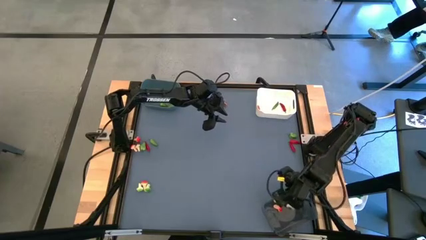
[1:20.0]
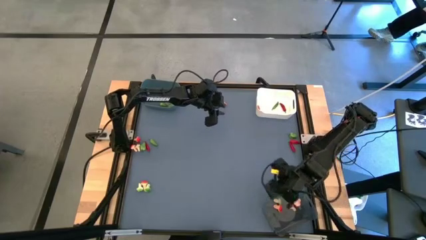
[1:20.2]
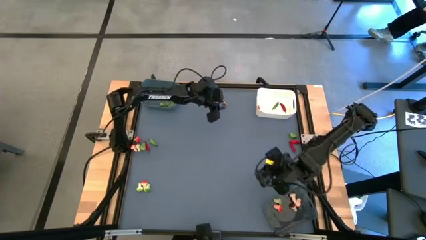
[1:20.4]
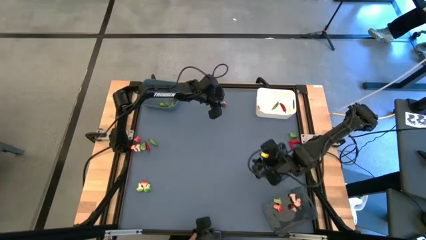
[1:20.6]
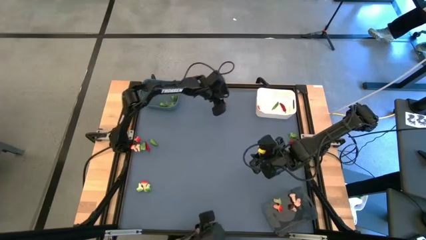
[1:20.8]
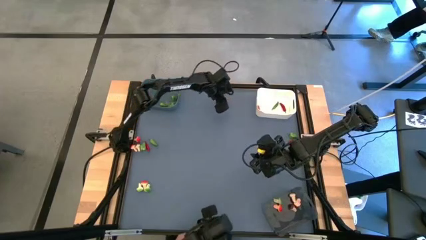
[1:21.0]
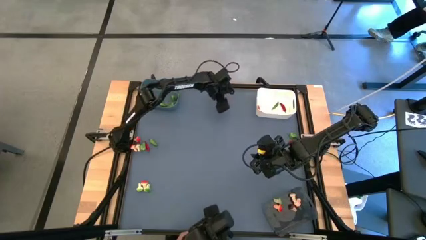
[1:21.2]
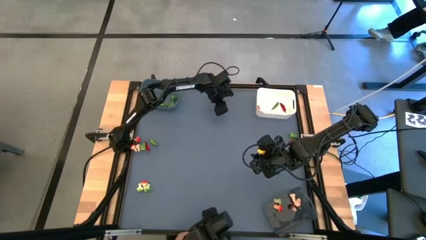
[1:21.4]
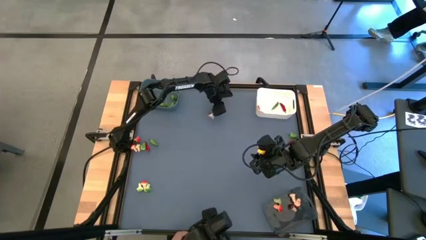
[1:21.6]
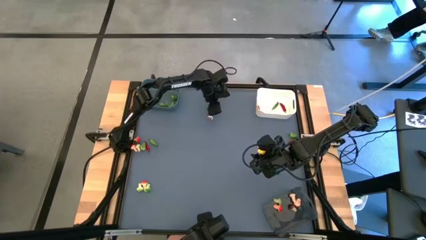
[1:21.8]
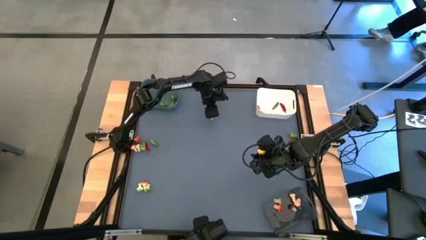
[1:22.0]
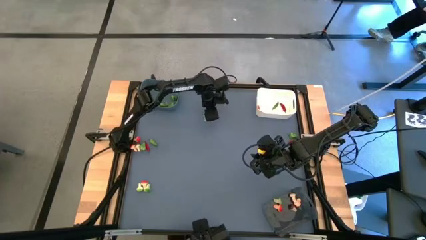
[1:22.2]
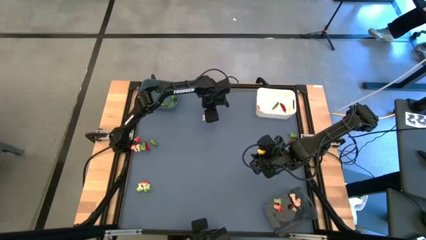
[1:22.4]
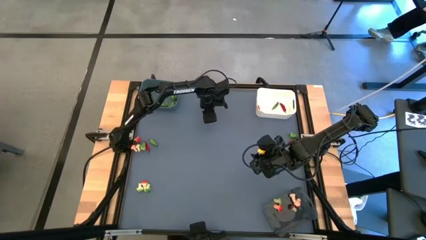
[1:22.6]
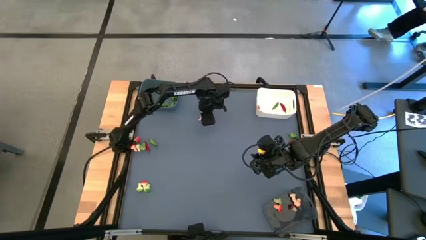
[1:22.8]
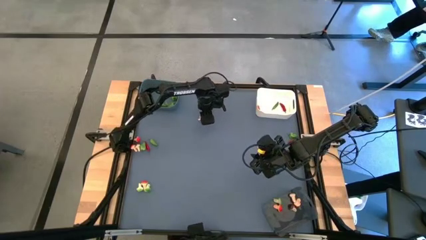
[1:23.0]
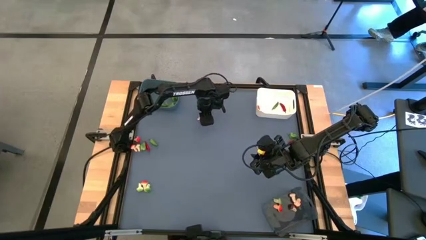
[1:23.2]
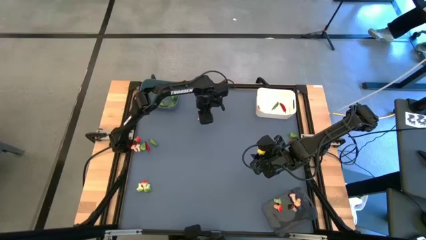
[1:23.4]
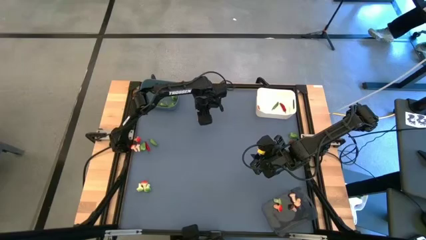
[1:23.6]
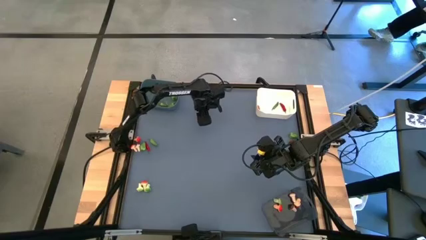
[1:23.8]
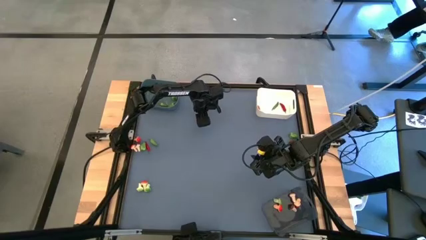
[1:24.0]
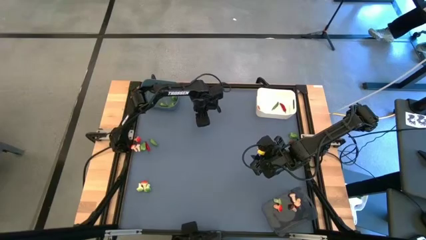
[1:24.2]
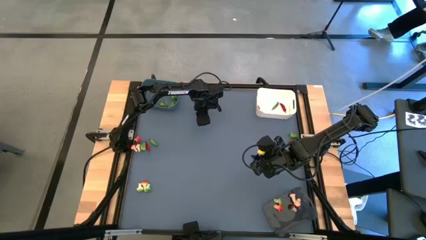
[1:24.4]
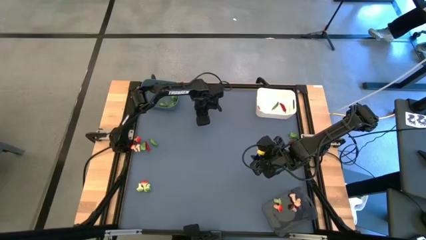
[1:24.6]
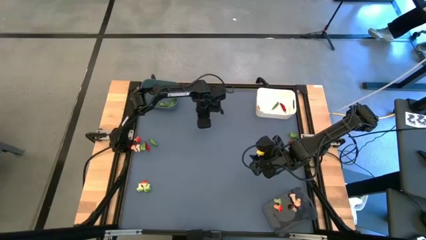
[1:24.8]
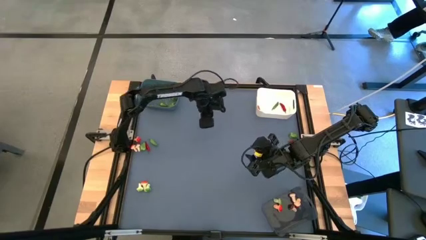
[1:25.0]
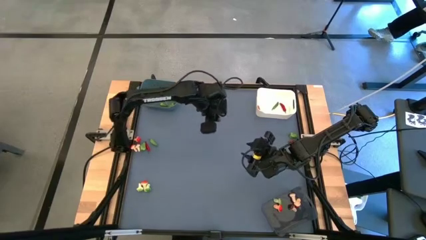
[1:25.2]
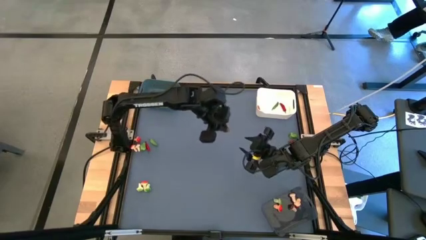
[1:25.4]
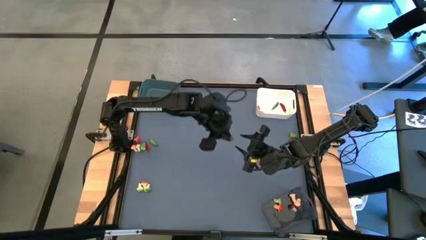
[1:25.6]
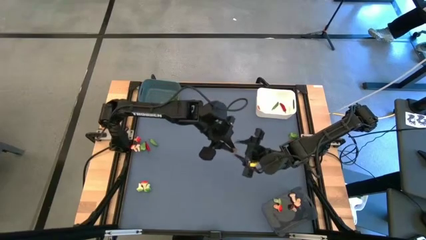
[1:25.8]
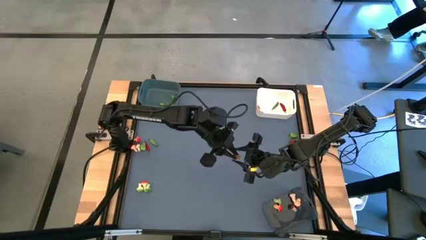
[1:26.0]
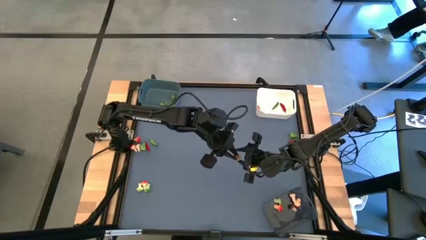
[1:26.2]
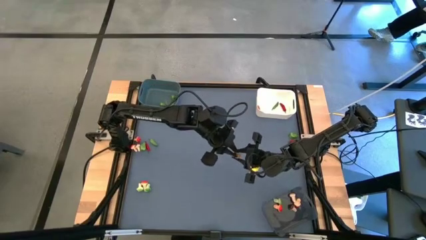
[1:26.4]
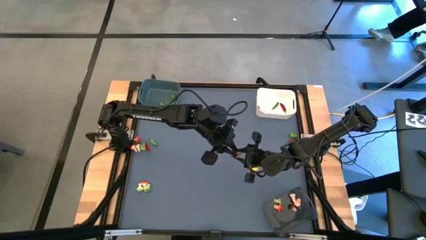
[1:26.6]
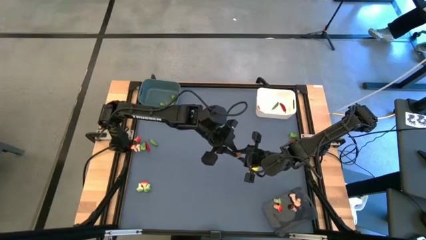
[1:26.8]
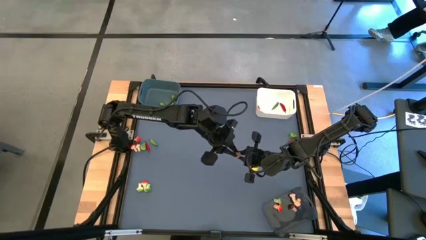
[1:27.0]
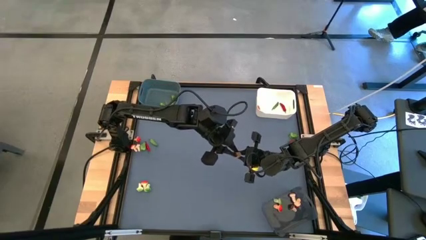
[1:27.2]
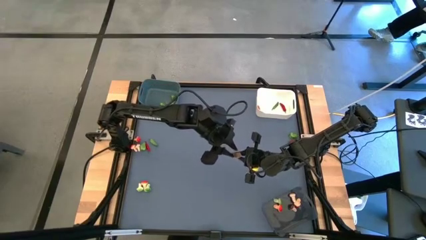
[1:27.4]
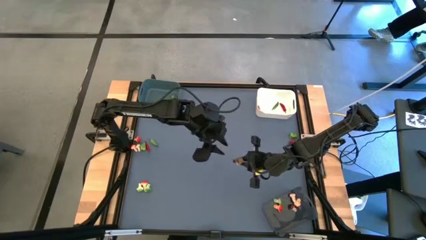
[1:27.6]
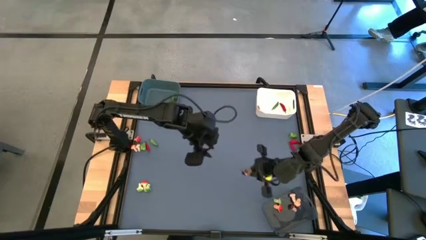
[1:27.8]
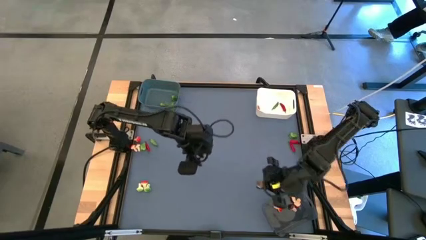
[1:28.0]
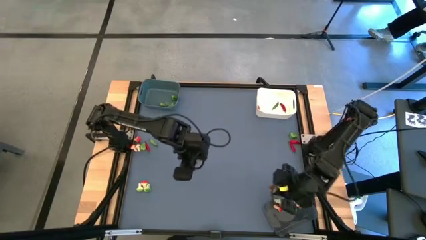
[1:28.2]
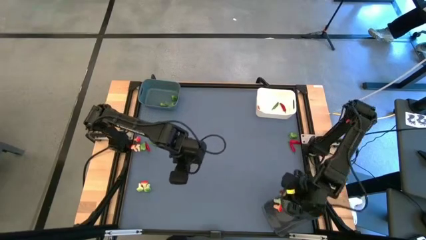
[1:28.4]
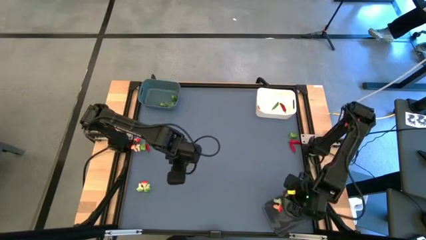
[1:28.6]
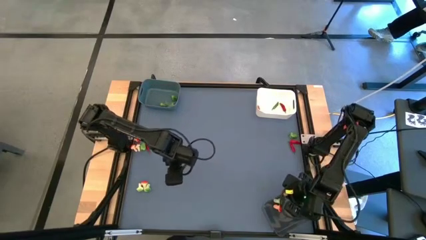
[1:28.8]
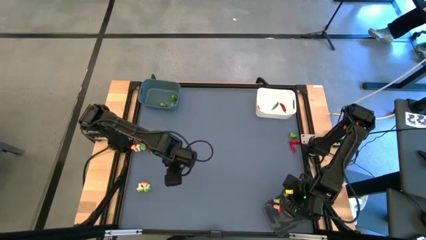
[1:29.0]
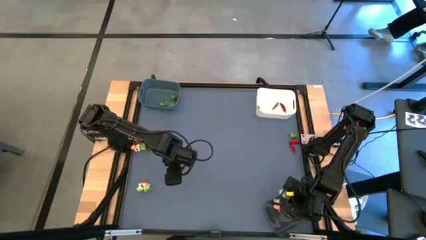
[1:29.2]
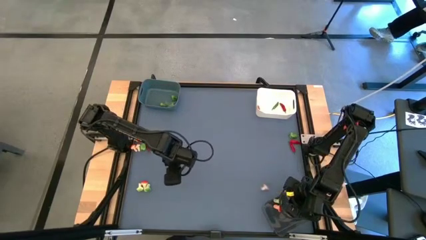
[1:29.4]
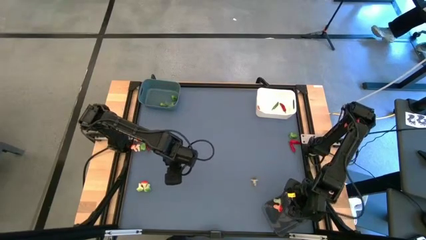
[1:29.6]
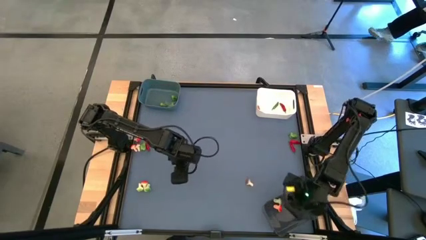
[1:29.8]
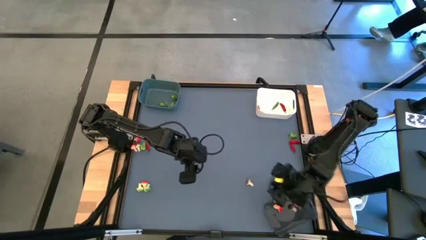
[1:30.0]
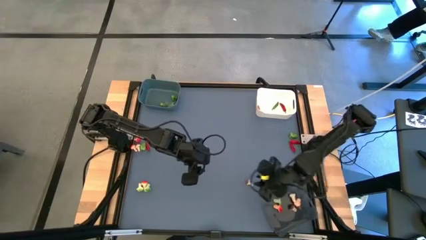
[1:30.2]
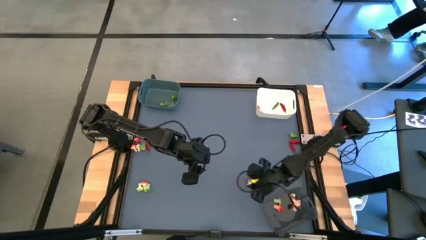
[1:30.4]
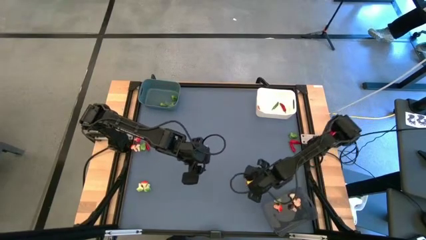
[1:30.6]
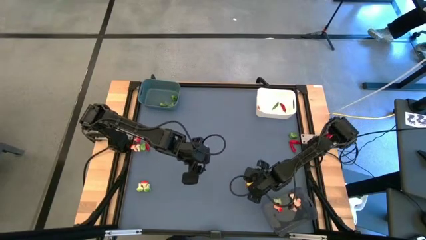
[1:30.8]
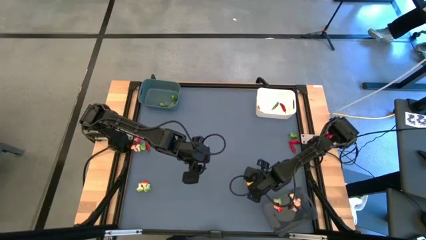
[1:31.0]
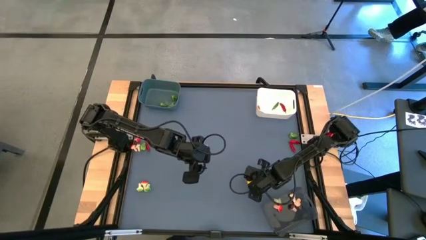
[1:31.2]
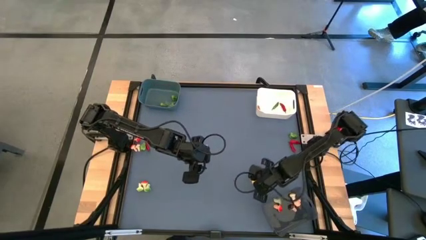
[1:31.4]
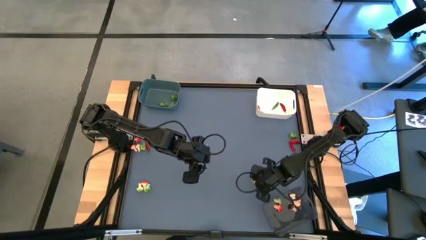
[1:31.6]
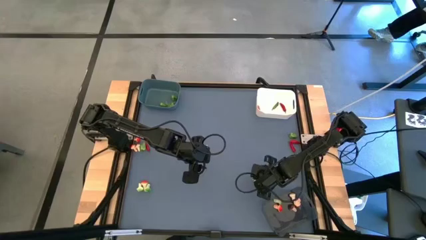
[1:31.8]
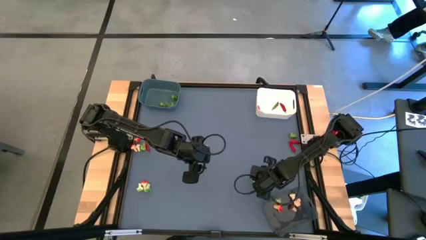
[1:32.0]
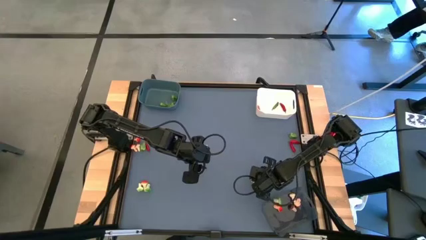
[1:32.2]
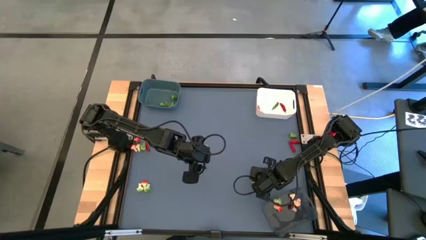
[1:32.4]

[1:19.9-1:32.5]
Task: Sort produce into baskets
Put the brown mushroom into the black bin

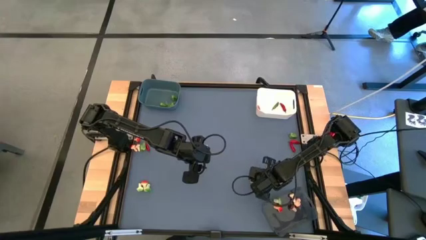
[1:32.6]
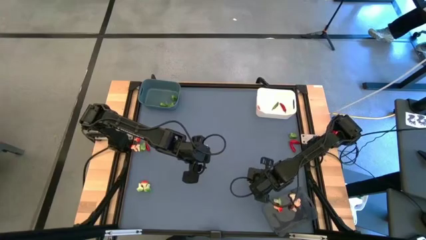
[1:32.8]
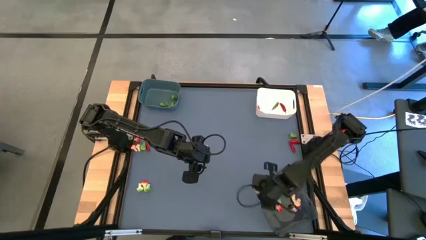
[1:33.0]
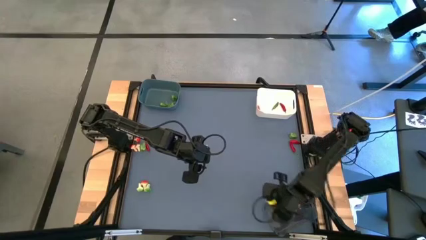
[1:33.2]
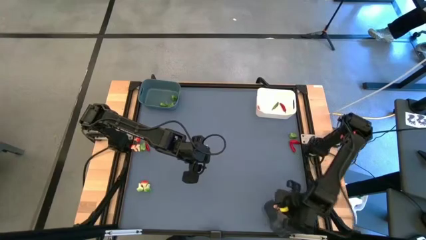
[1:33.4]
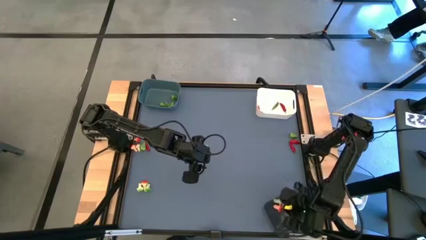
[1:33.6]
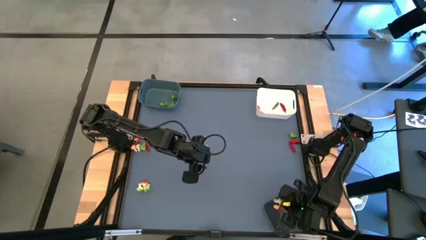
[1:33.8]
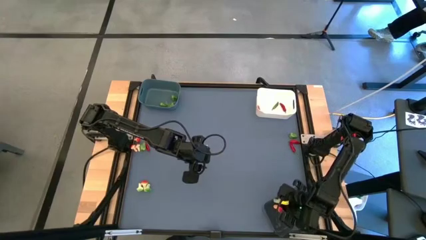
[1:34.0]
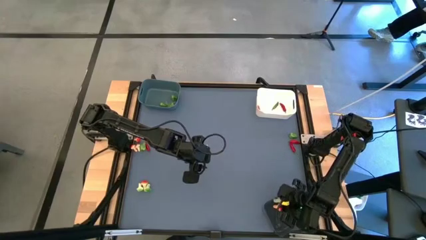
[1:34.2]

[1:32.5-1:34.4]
Put the brown mushroom into the black bin

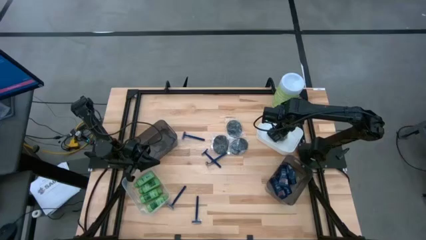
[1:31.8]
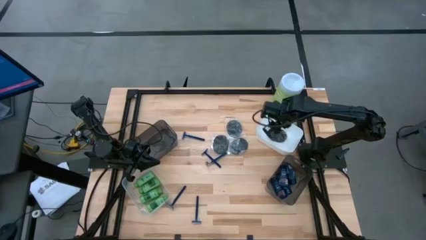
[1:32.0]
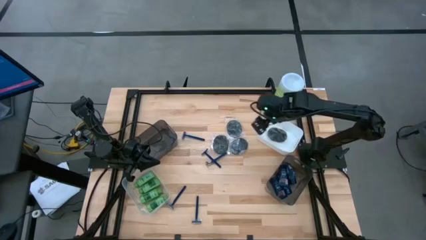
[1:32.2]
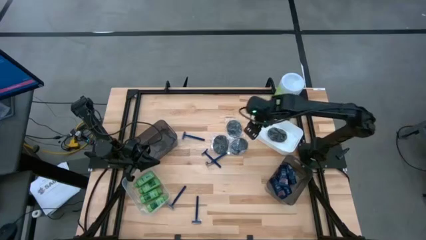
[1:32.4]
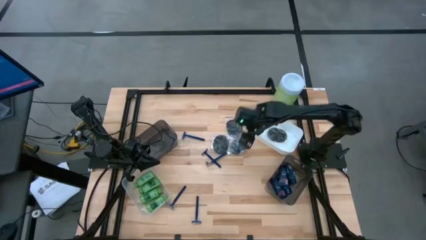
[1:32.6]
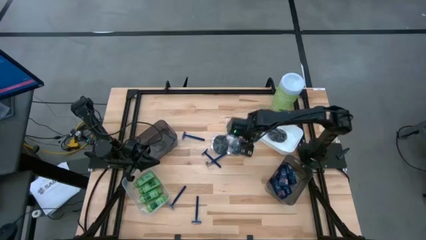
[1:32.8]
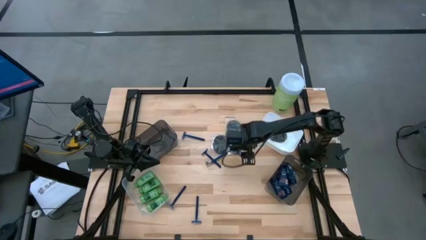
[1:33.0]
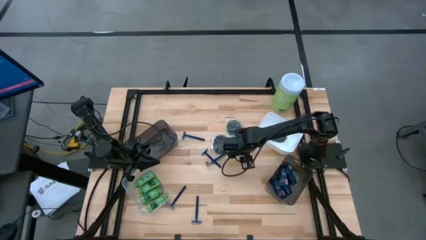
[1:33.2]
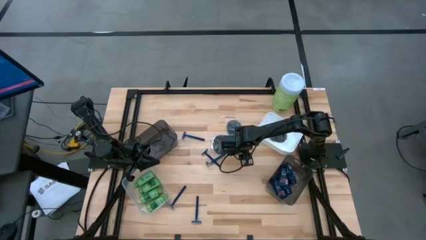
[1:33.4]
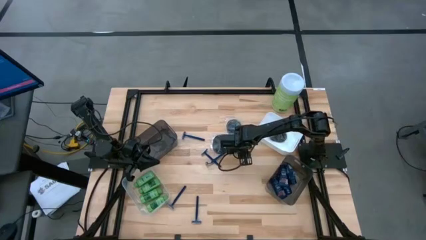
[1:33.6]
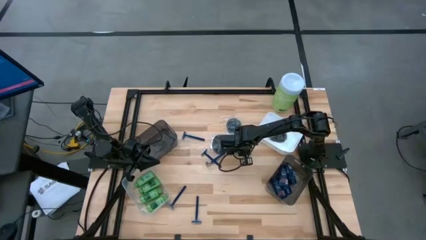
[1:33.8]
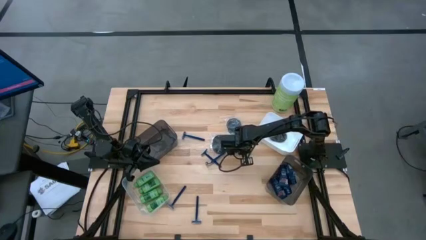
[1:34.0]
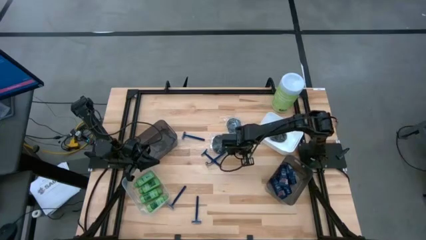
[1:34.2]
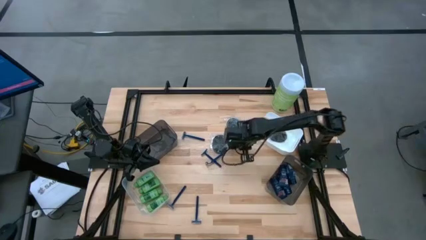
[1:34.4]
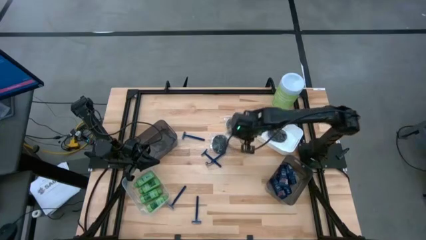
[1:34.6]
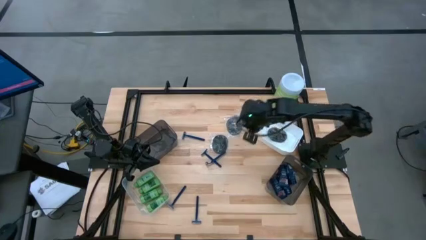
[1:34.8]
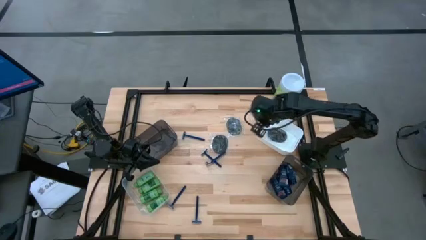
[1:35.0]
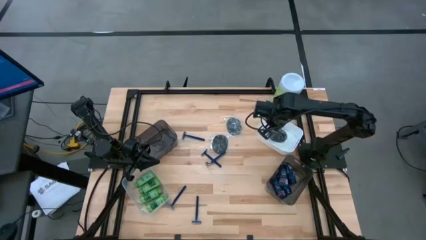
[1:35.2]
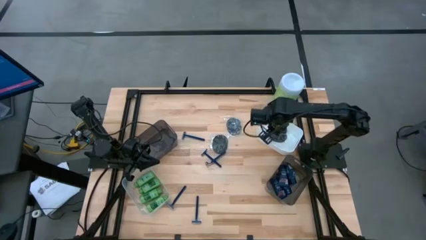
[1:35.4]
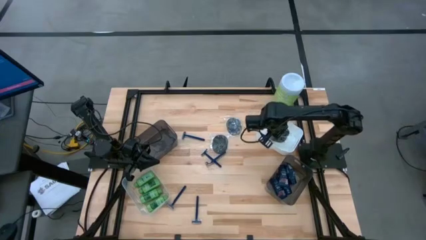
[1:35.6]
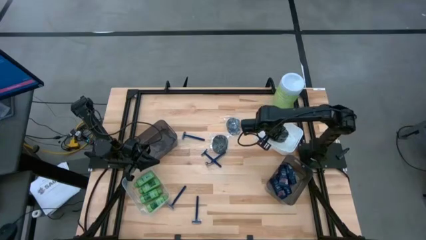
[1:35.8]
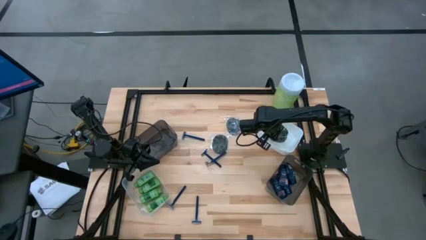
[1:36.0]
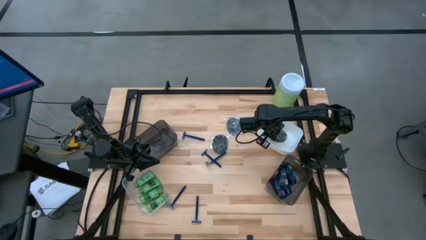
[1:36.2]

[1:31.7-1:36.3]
Task: Pick & Place Travel size toiletries
Put the black hairbrush into the white bin
